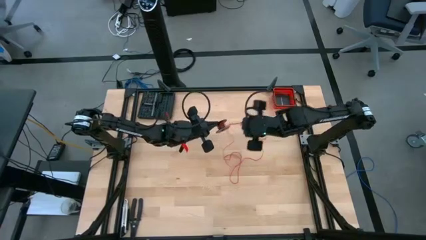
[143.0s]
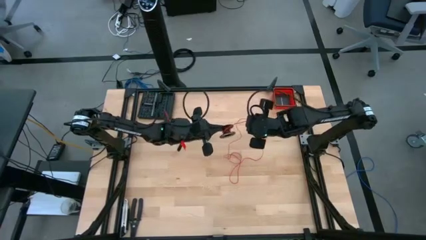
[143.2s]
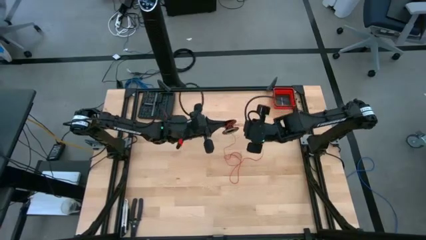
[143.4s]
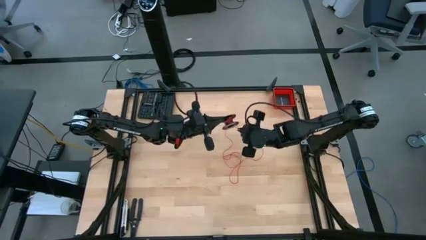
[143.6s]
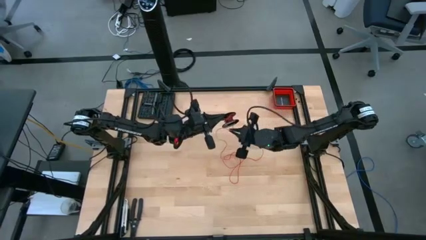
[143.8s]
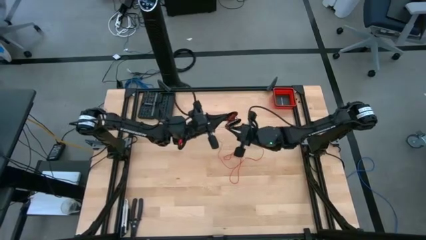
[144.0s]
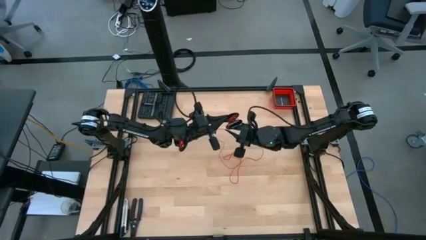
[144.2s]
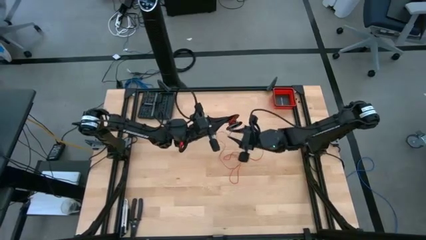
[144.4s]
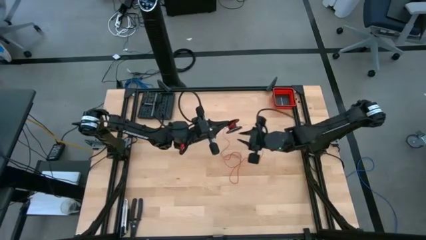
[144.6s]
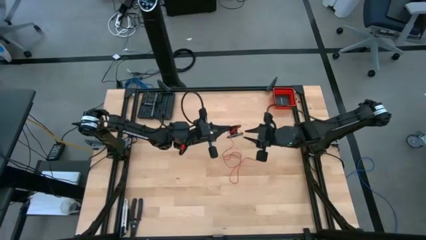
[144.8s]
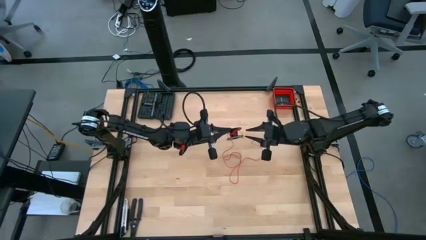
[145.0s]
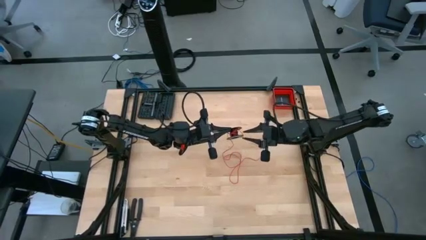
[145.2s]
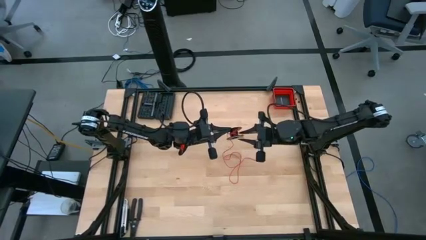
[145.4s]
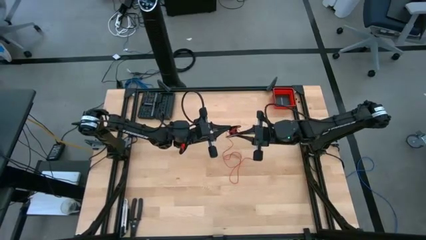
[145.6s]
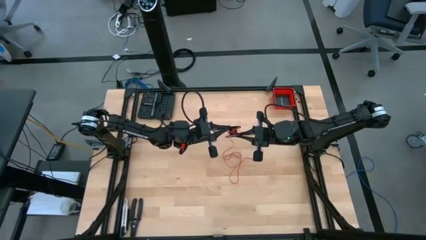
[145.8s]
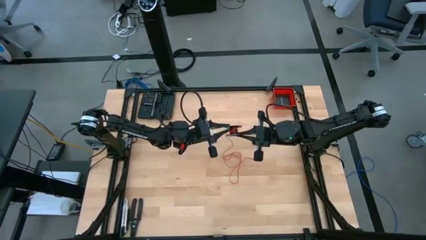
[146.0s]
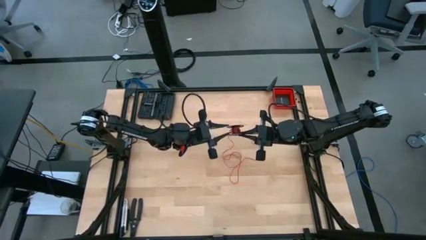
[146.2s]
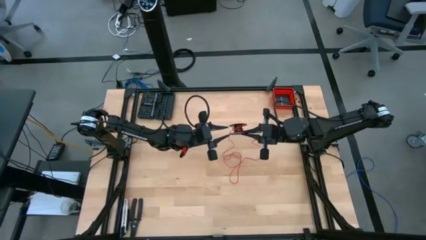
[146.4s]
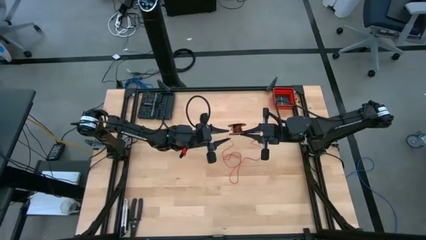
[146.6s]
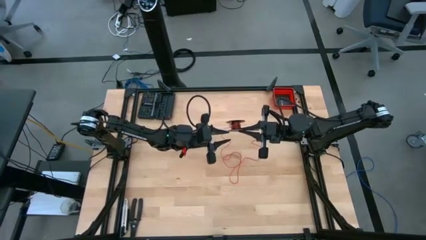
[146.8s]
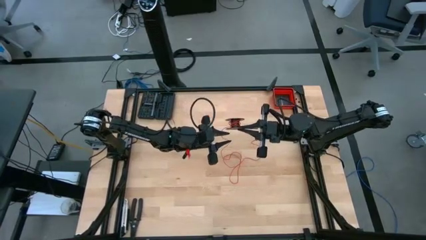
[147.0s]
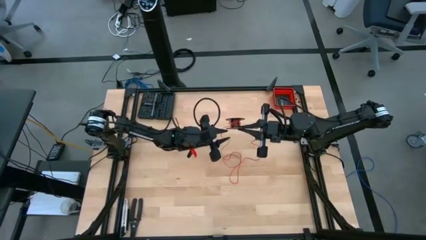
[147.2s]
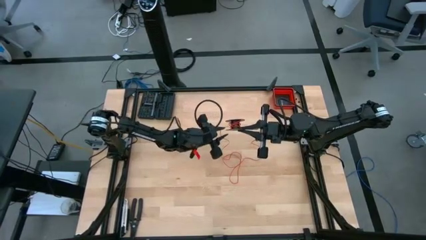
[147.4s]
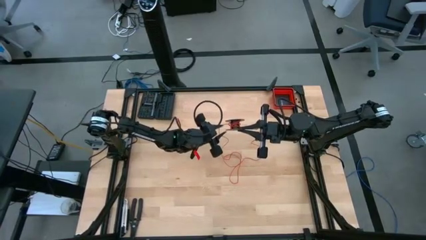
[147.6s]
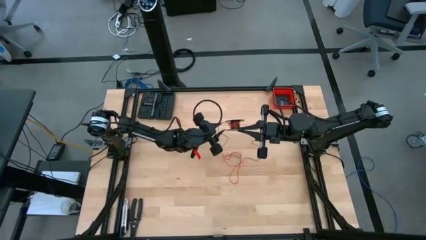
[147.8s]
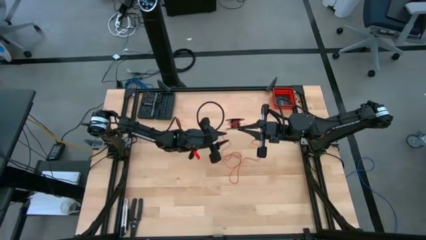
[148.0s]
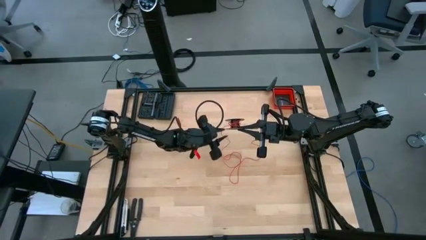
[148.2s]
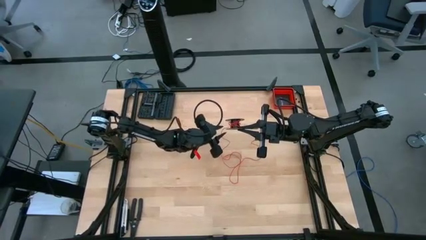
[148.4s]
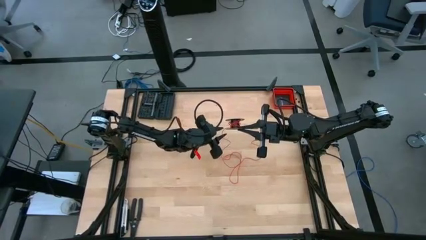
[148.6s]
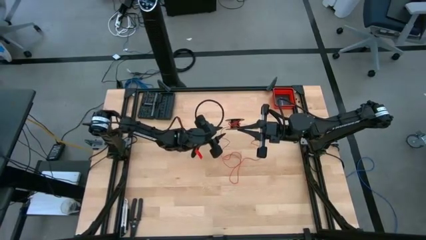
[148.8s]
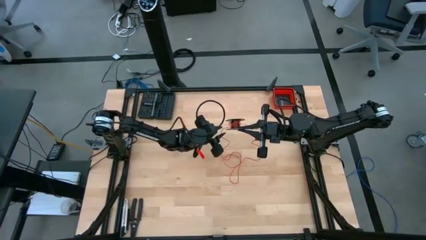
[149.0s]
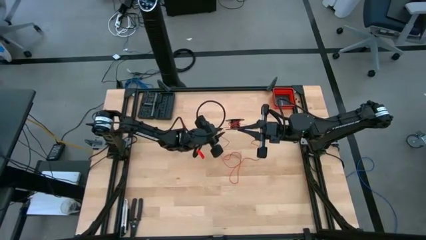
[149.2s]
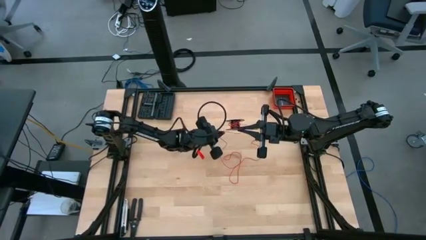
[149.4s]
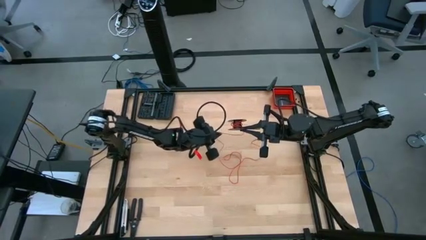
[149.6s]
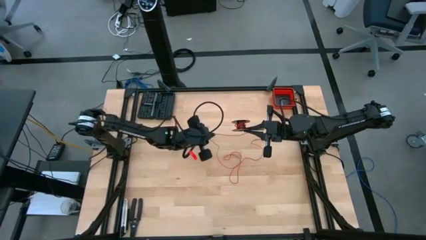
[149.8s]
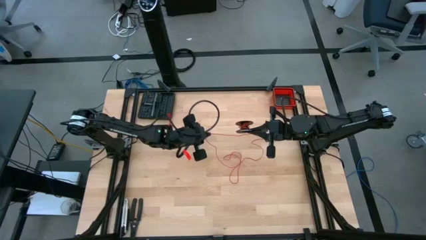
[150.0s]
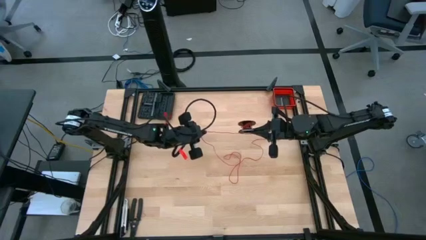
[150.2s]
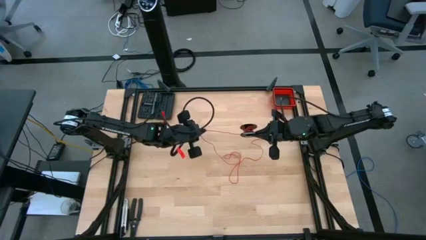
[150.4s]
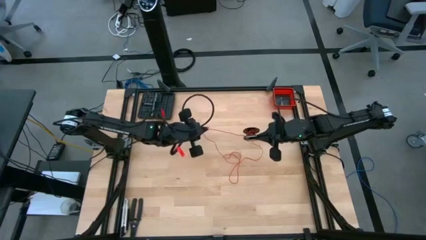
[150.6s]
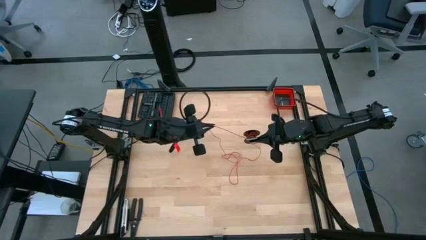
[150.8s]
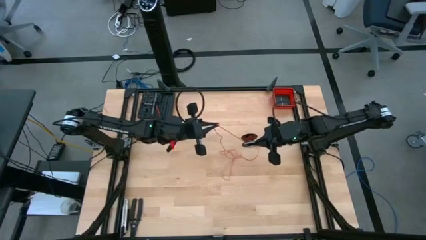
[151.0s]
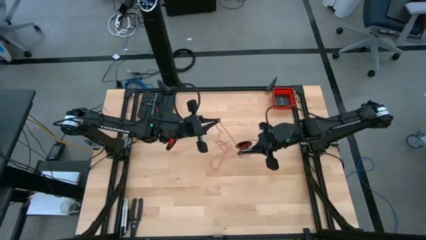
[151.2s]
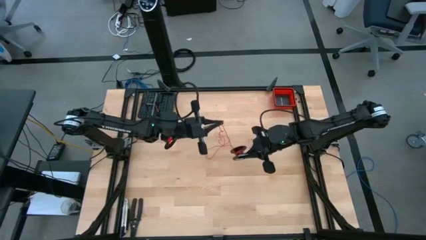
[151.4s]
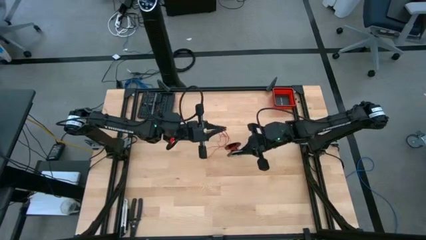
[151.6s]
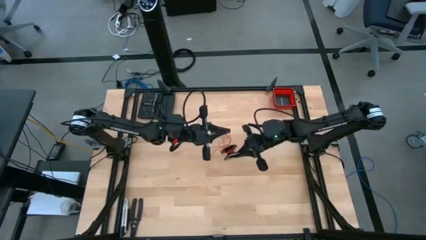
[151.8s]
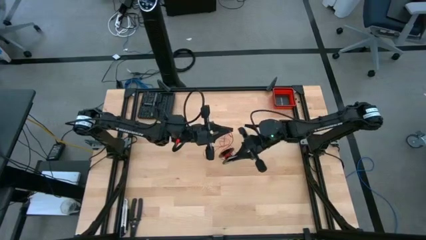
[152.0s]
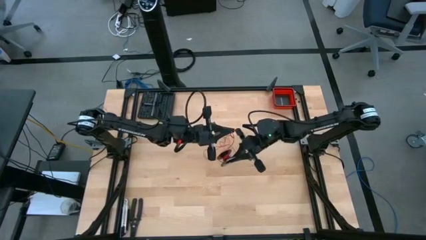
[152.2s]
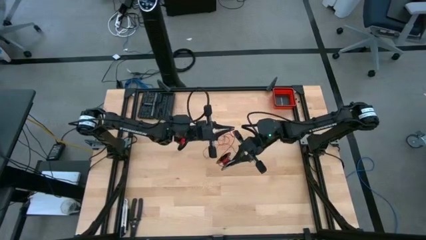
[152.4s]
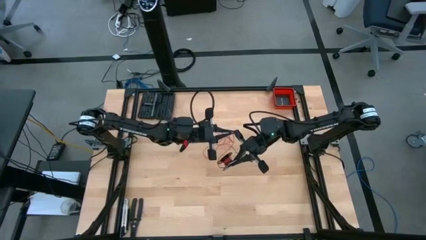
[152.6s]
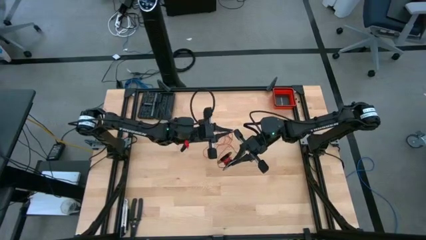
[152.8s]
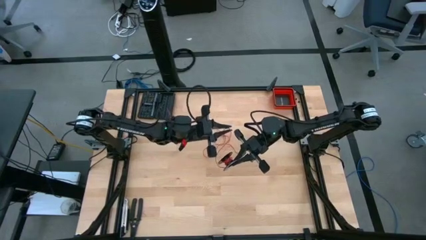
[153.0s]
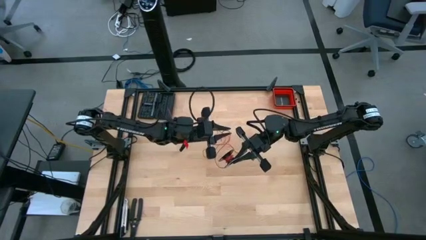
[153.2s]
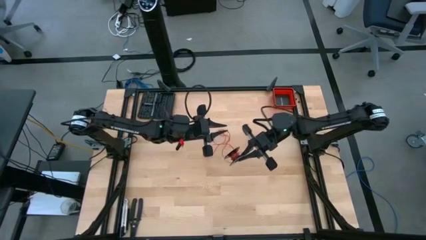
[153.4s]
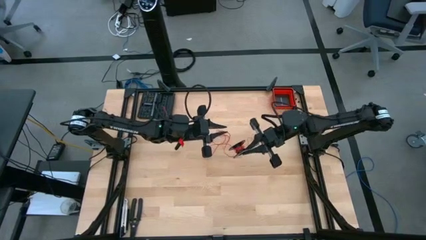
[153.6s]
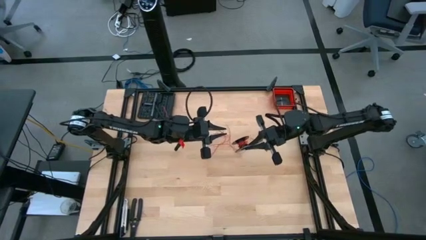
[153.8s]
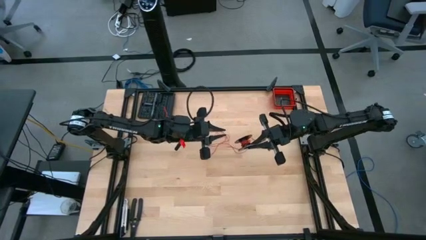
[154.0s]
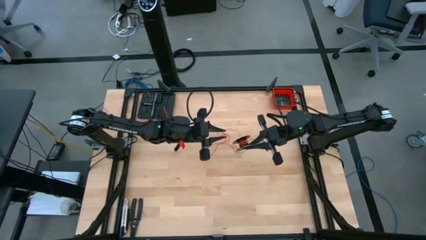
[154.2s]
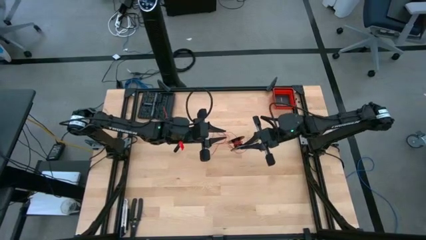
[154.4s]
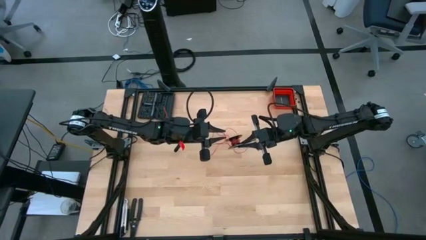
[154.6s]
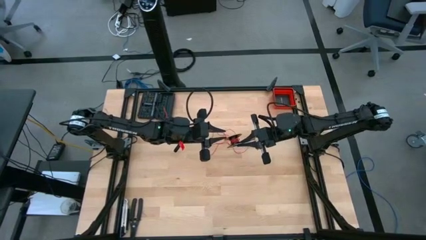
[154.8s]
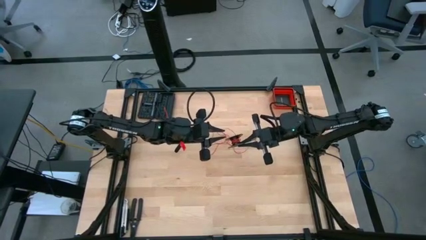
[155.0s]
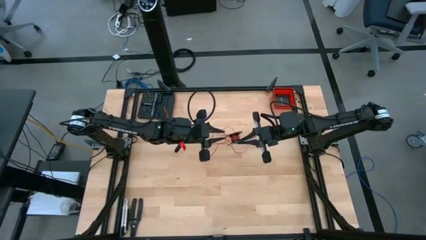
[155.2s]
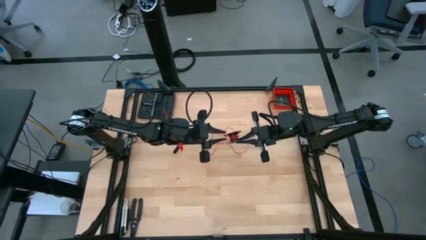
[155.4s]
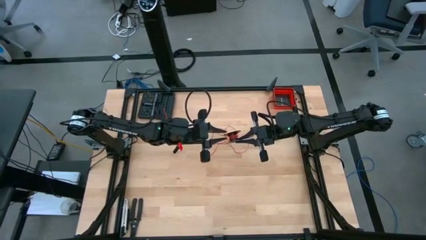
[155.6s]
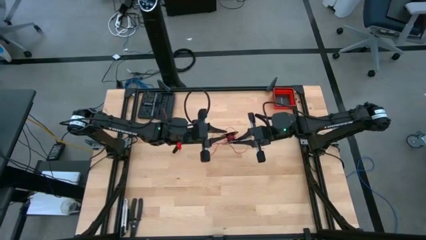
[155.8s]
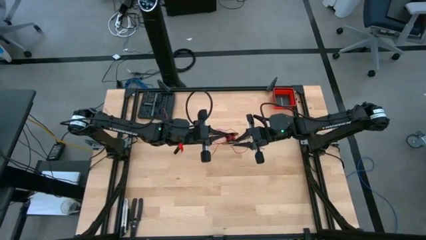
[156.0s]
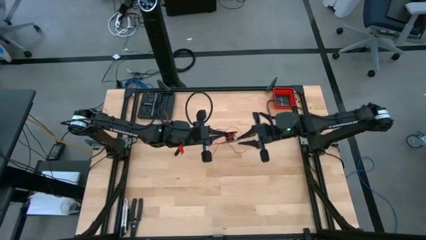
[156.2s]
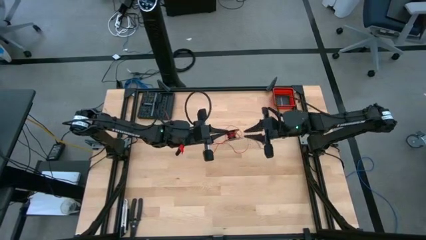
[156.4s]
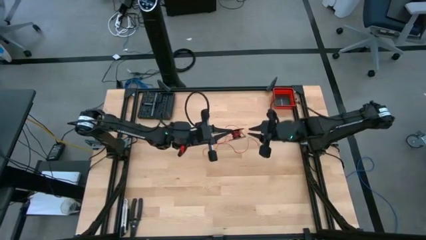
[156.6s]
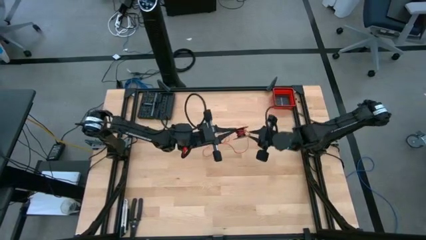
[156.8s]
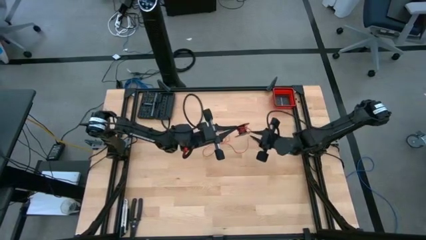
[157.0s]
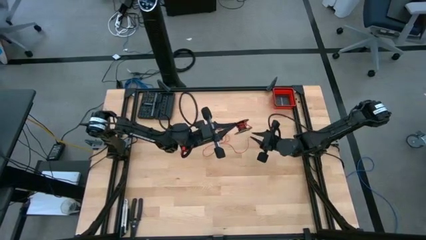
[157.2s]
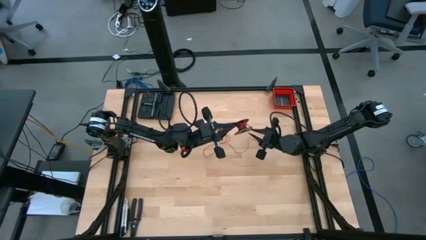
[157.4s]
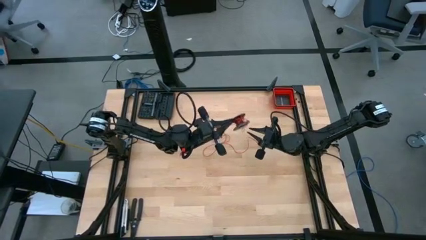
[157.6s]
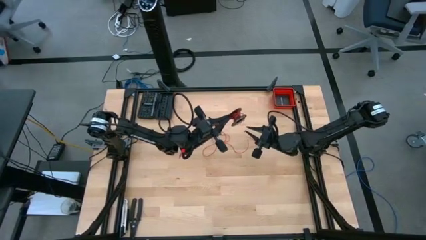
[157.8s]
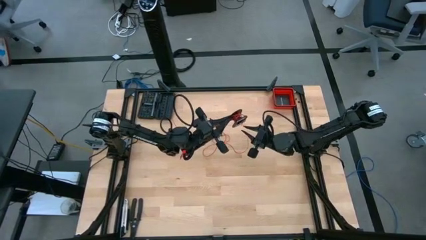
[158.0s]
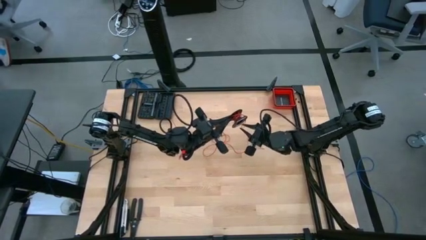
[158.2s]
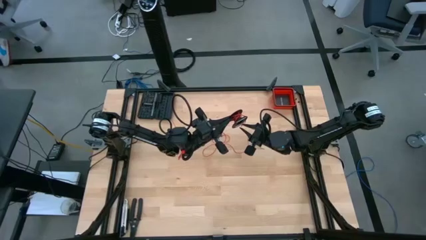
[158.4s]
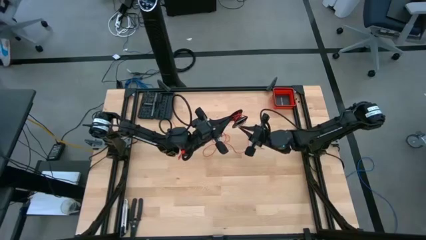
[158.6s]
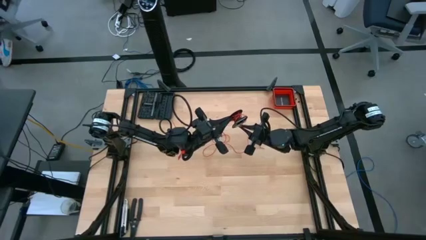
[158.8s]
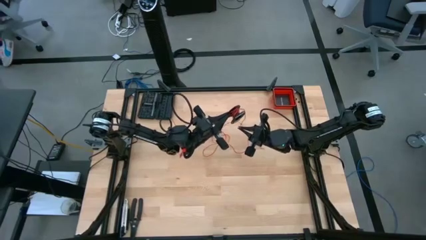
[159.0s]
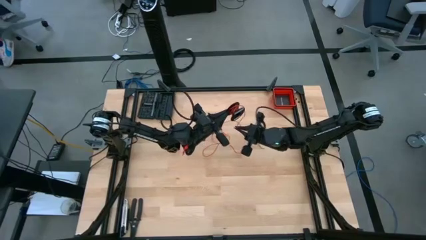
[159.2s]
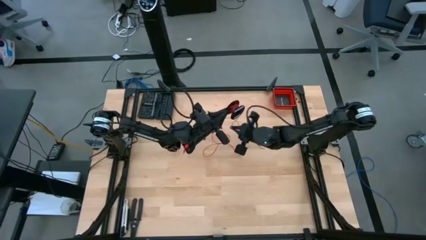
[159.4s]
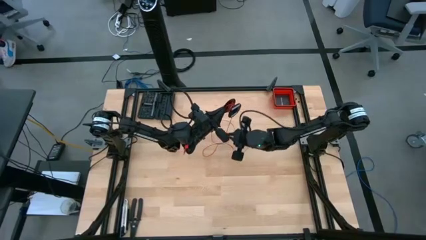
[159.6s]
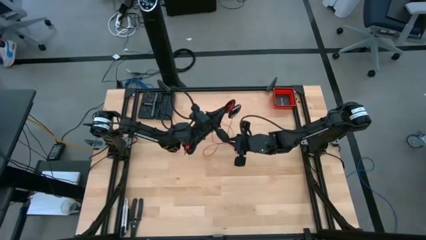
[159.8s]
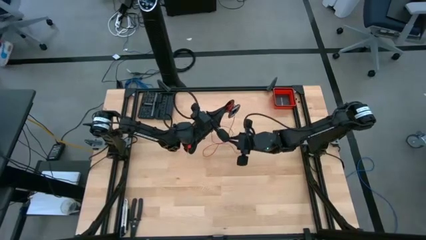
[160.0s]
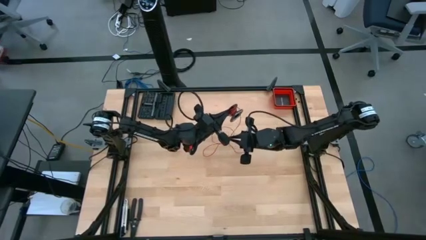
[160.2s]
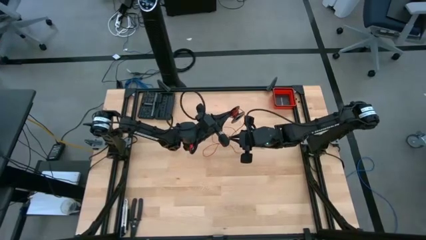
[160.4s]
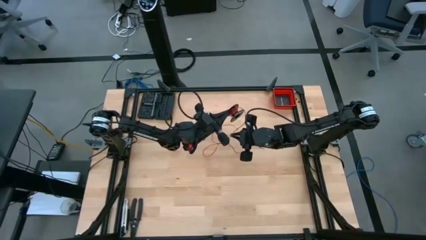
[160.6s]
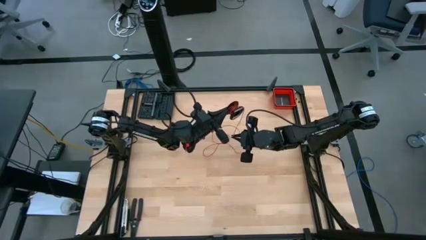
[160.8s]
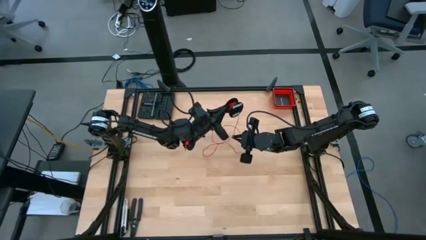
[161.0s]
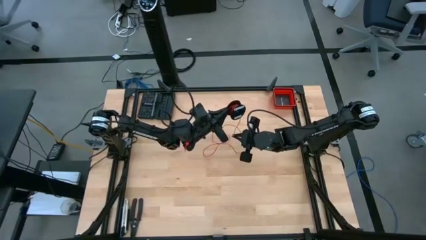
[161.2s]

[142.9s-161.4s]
Task: Coil cords
Coil the red wire on the black spool
